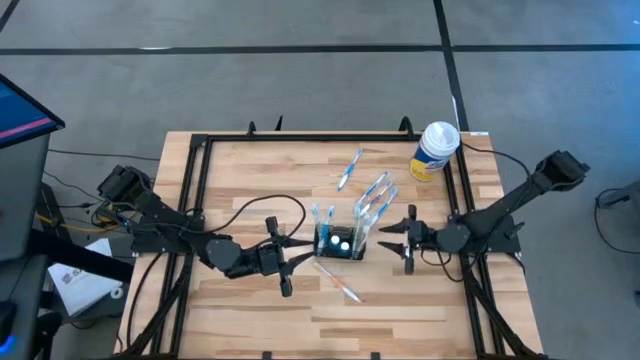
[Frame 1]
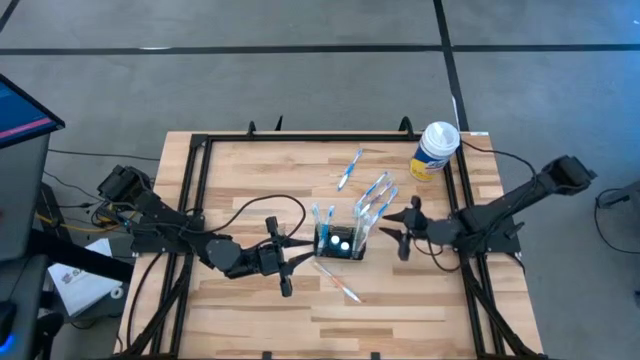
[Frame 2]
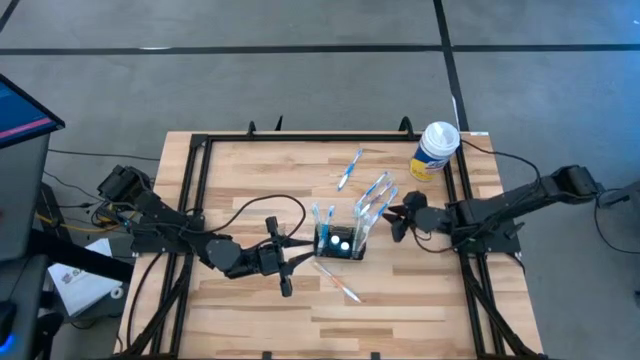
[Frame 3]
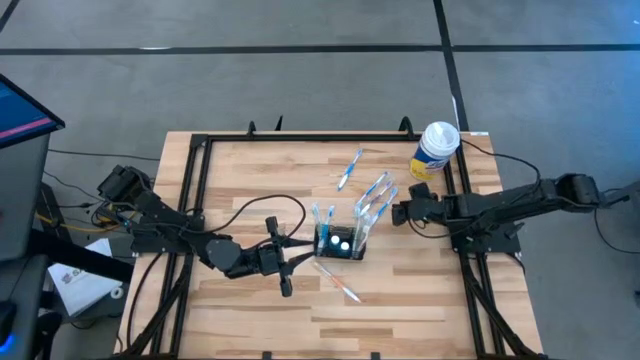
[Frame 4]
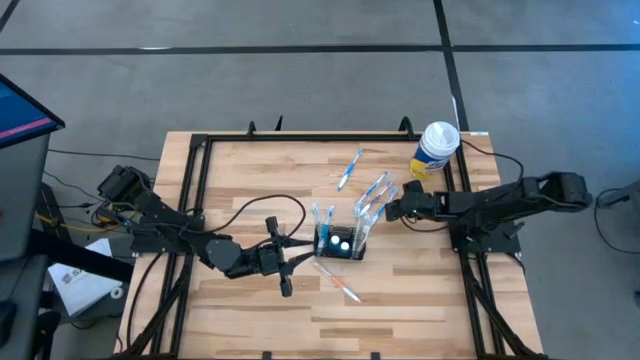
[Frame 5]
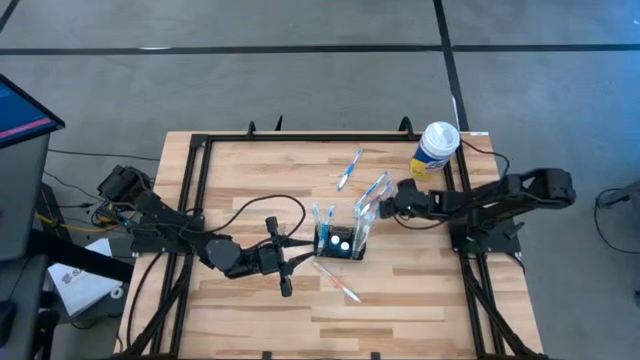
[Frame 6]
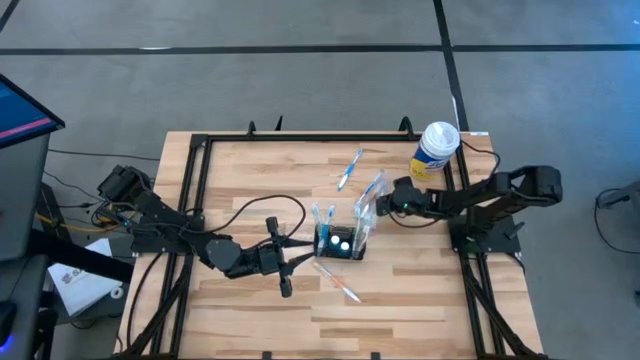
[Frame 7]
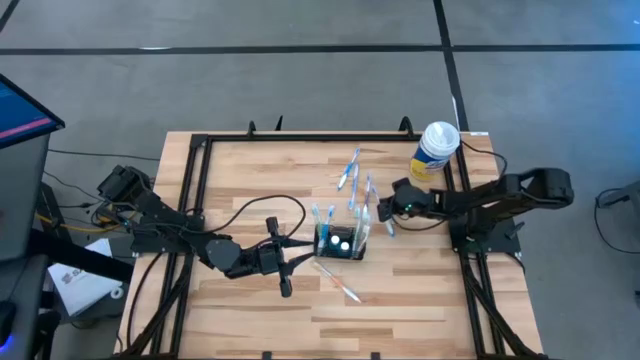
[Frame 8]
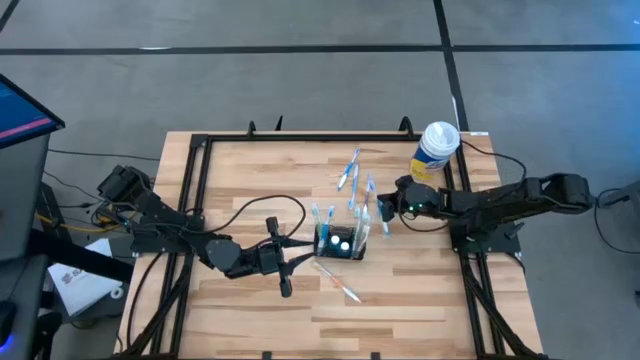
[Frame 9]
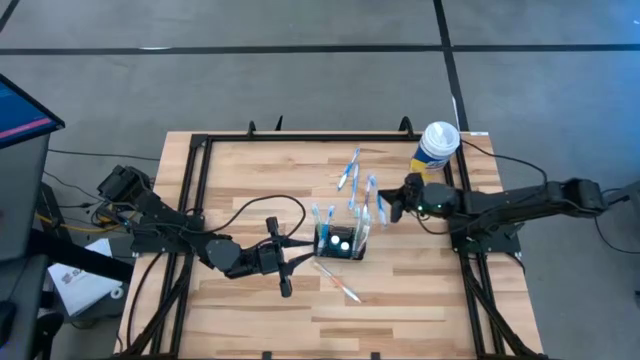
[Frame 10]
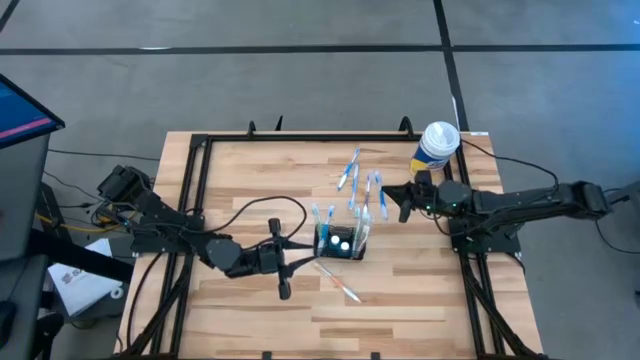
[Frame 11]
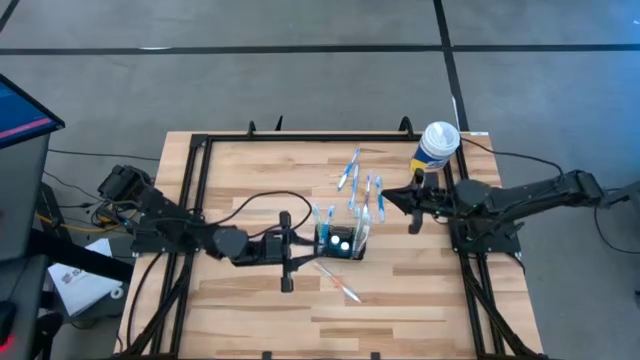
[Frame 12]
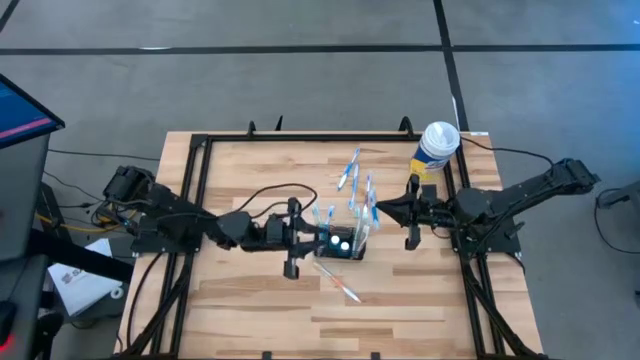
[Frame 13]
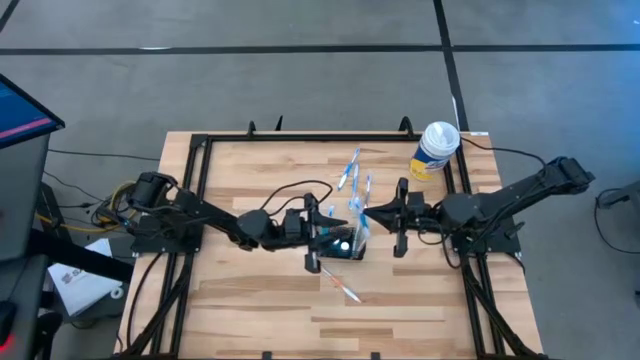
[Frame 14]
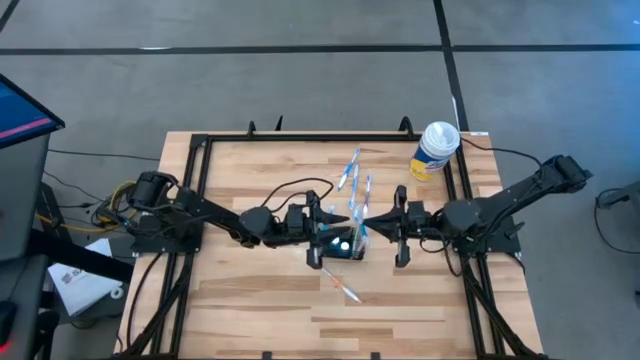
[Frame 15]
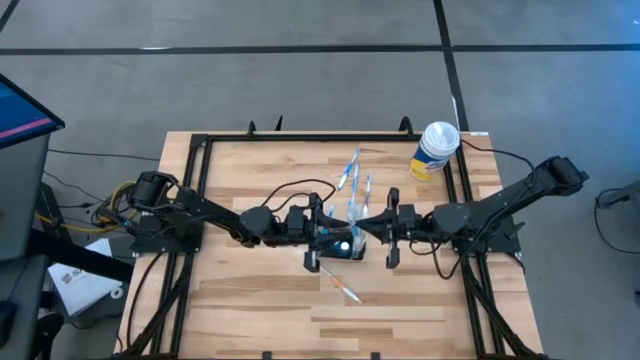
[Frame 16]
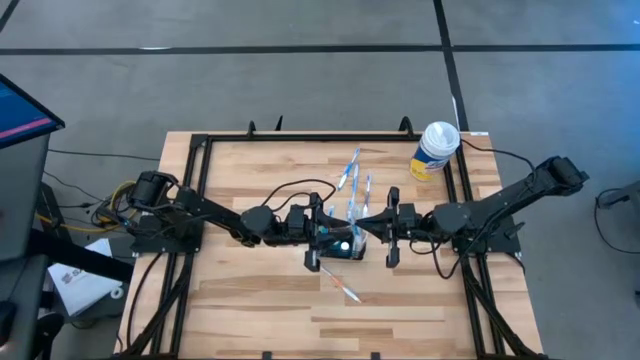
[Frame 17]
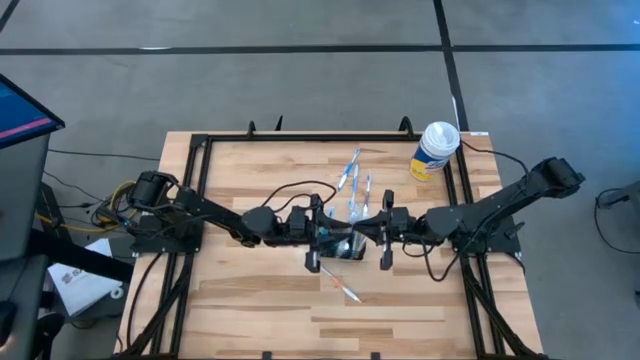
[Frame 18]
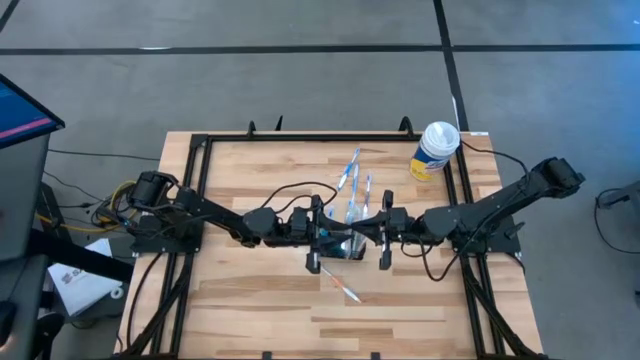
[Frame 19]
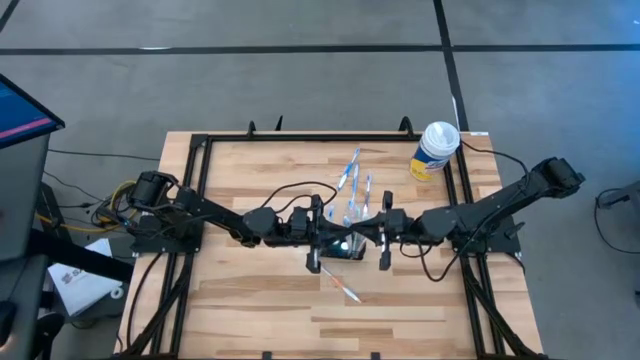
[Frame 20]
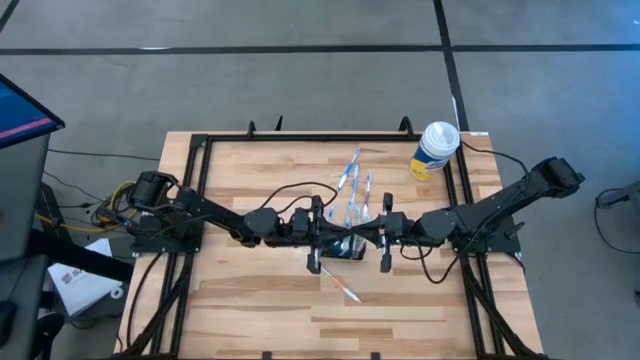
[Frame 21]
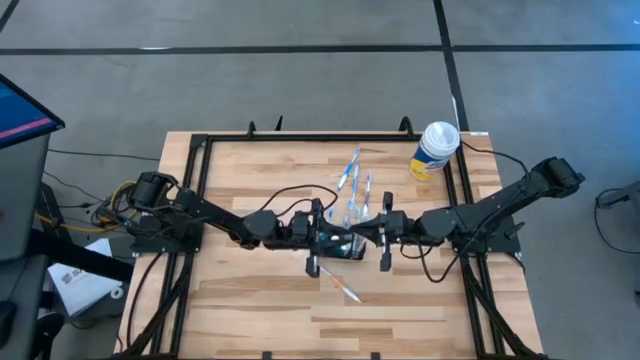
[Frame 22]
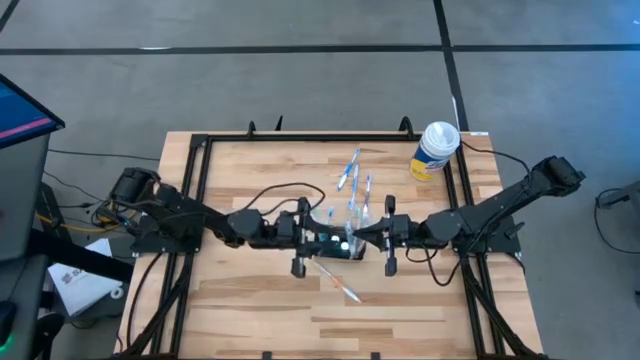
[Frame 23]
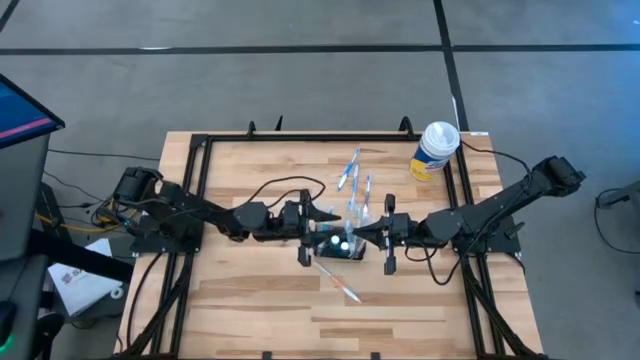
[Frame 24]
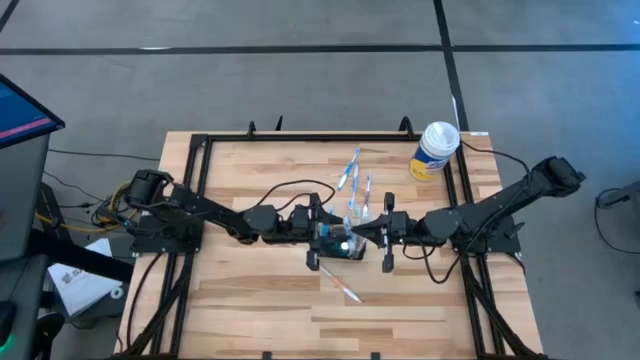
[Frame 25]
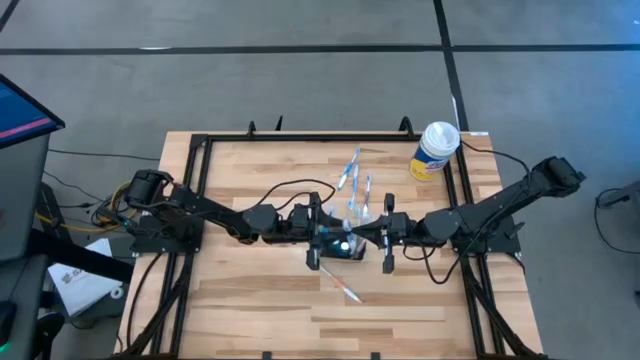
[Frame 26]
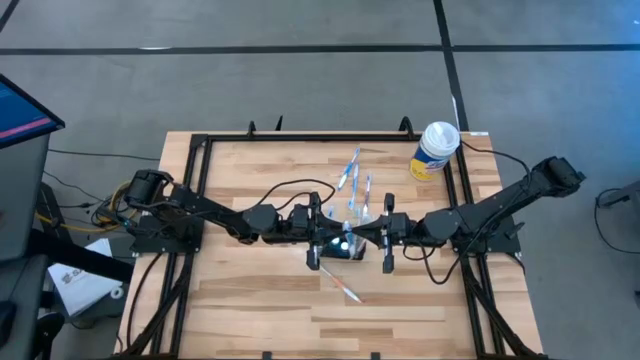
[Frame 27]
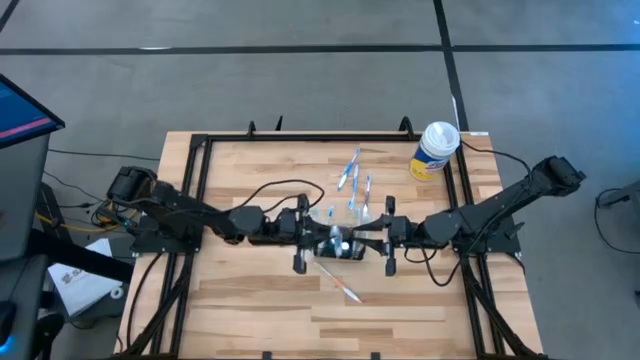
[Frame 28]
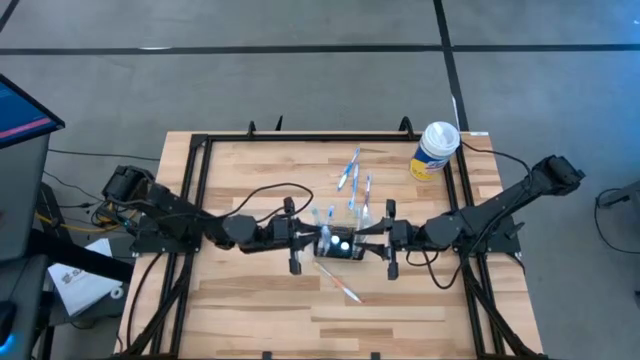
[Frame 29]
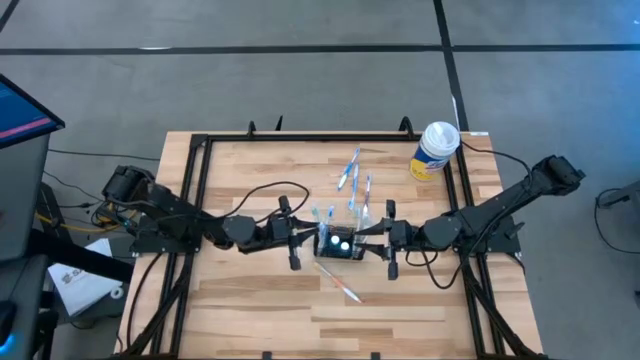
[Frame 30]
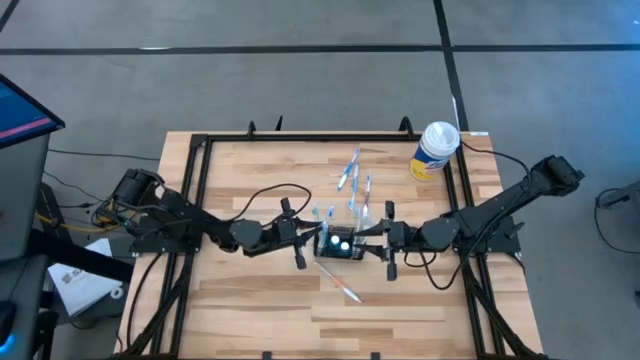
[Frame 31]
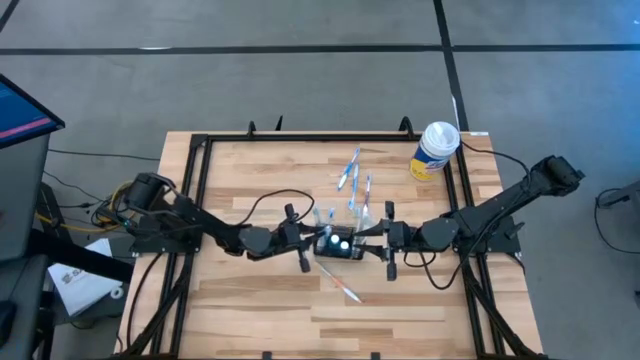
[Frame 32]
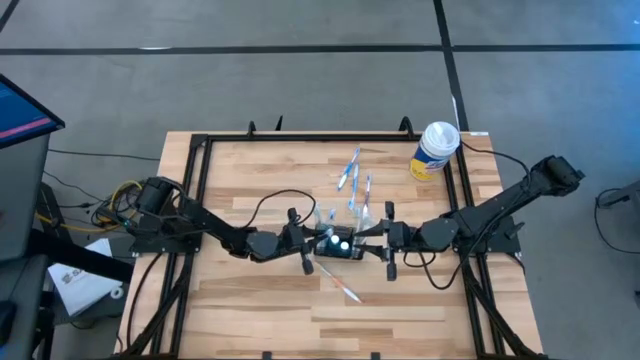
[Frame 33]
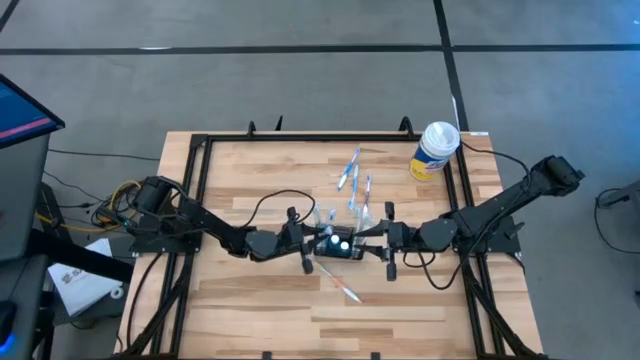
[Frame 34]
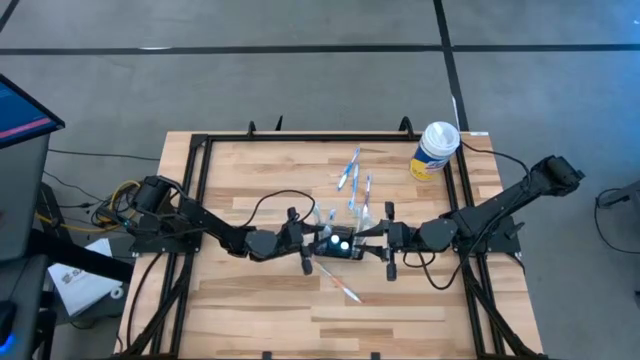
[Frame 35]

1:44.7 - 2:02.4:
Task: Pick & Place toothbrushing station
Put the blue toothbrush into the wire organizer
